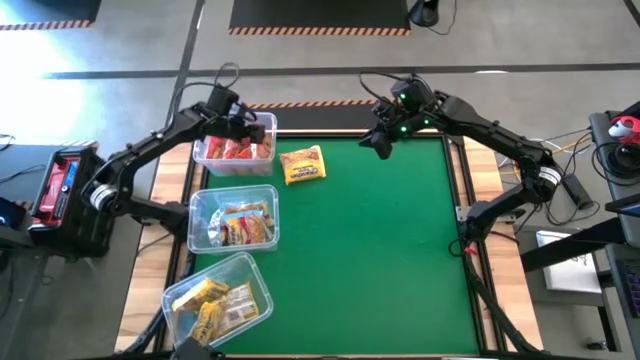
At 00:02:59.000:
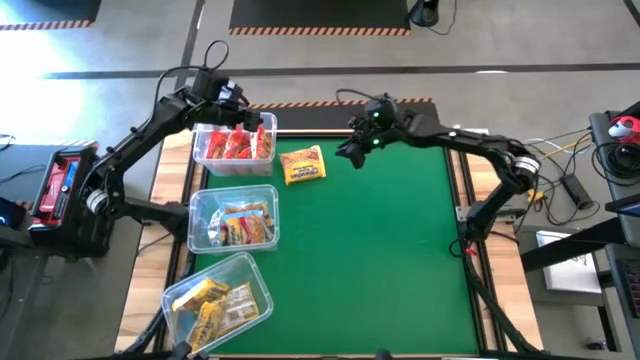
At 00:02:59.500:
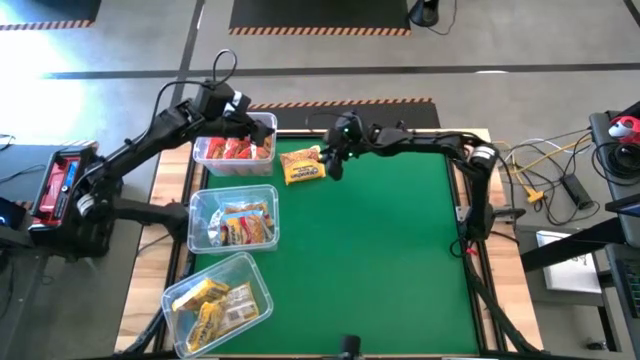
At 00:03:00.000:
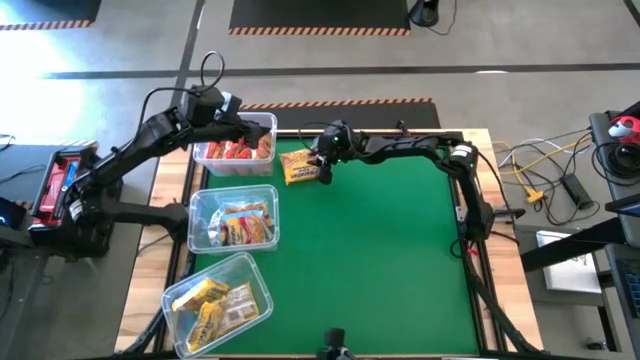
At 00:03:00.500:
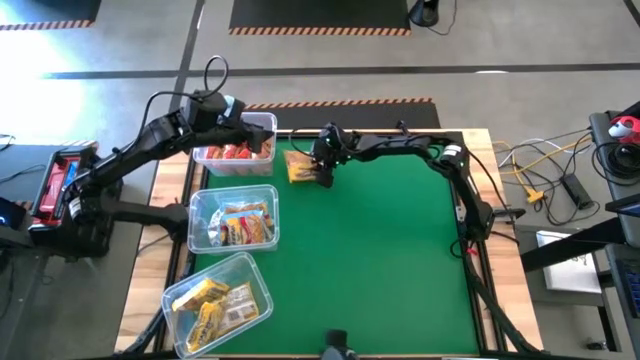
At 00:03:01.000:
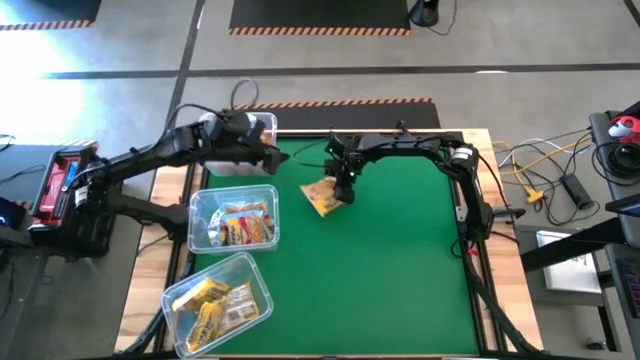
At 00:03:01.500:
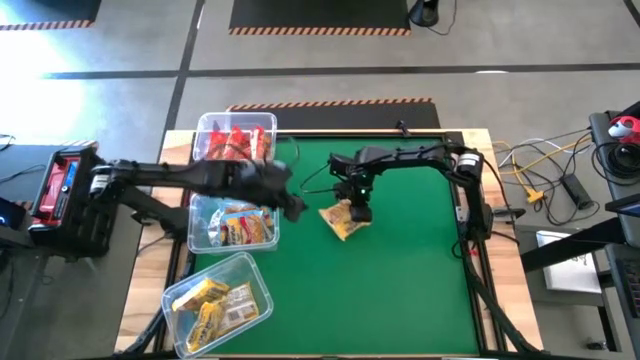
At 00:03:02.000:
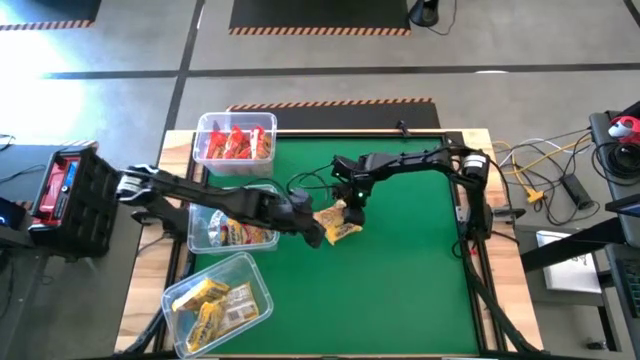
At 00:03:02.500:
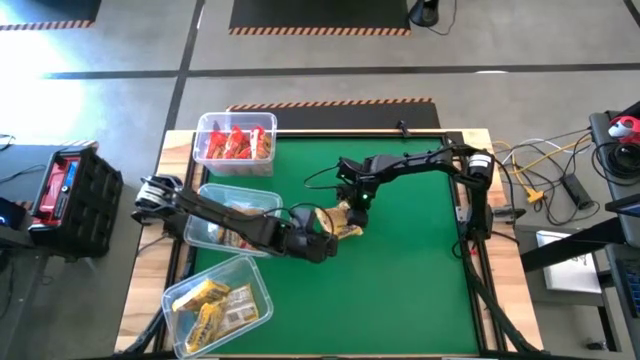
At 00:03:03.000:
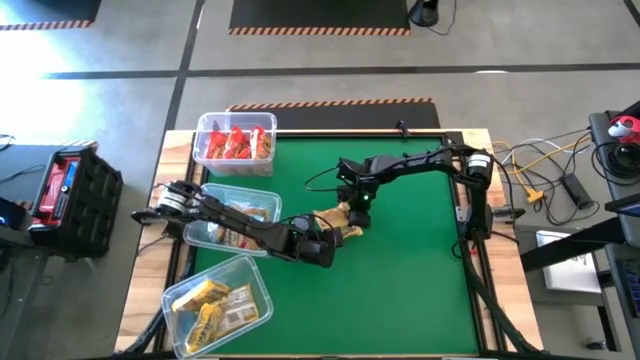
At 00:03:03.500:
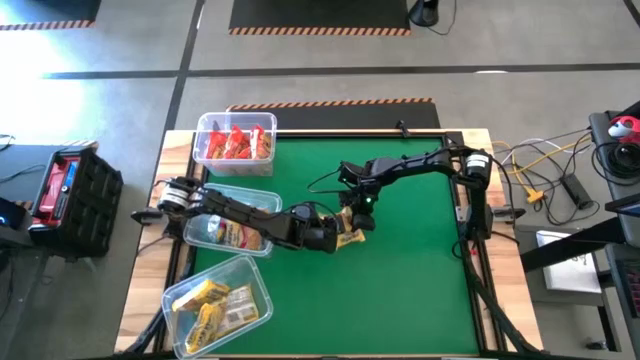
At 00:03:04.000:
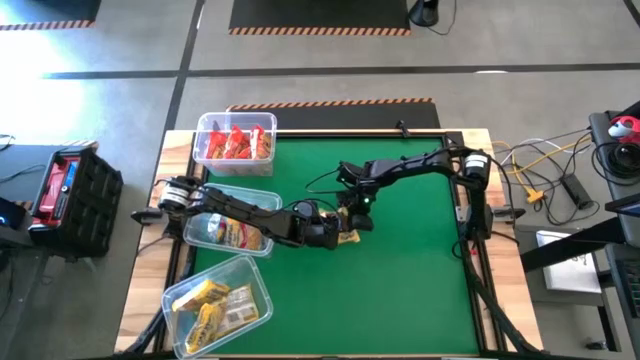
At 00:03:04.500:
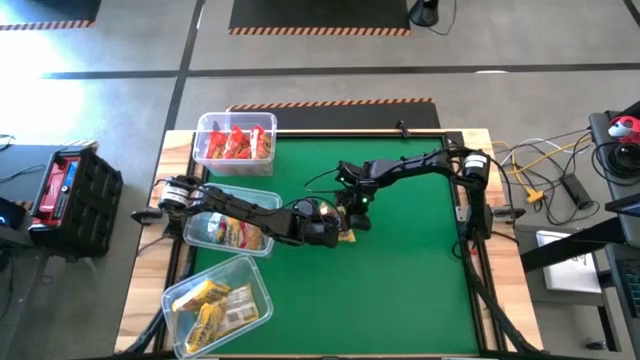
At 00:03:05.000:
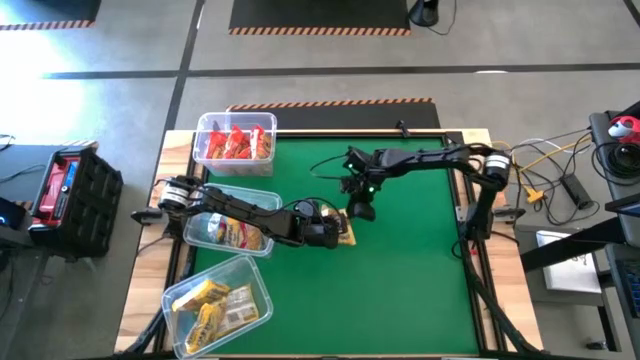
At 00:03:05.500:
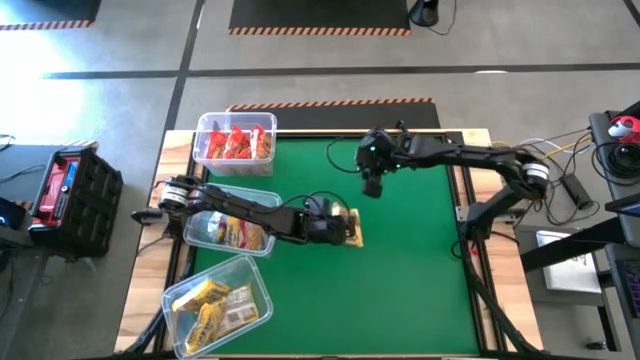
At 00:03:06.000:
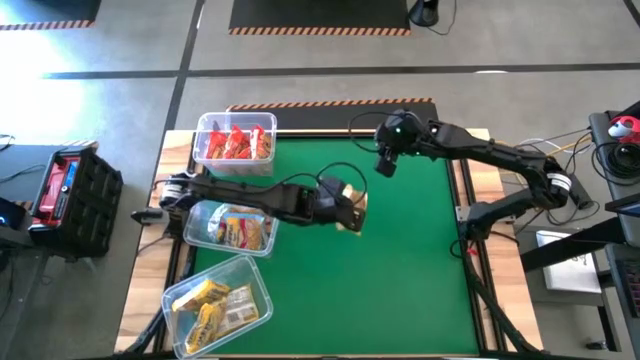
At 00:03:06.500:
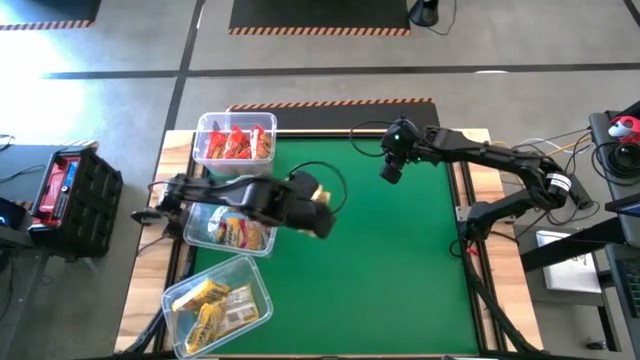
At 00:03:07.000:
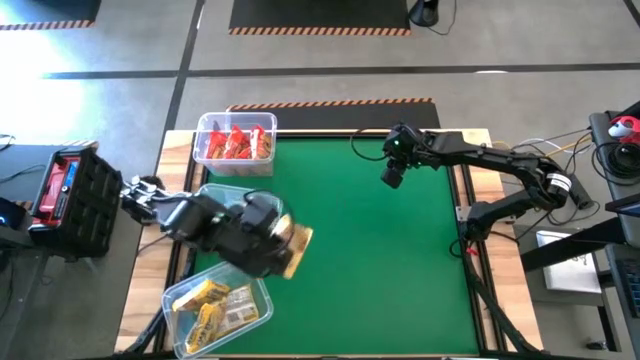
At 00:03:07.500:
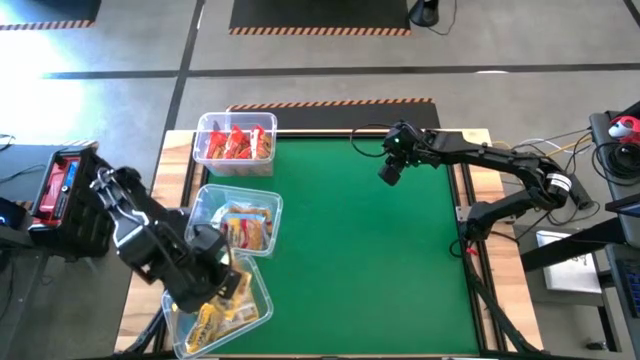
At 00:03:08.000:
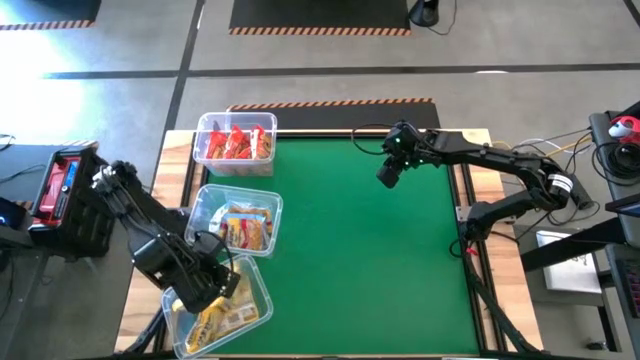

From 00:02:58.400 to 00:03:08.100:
Task: Sort Maruchan noodles
Put the yellow noodle pack into the bottom transparent bin

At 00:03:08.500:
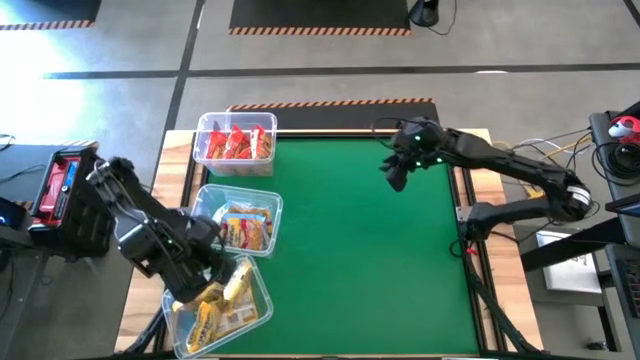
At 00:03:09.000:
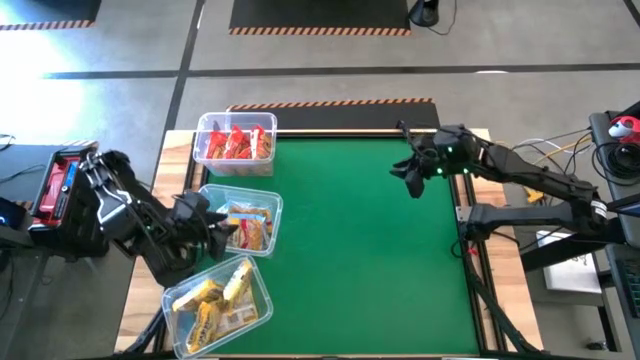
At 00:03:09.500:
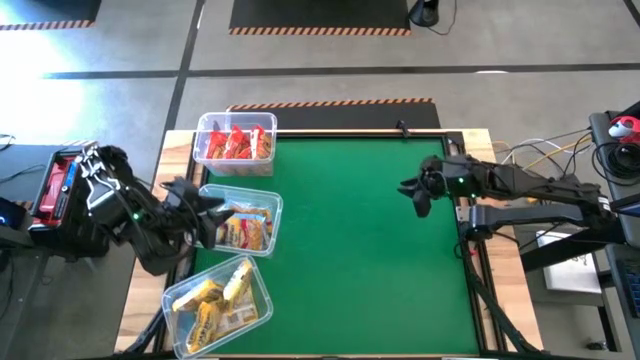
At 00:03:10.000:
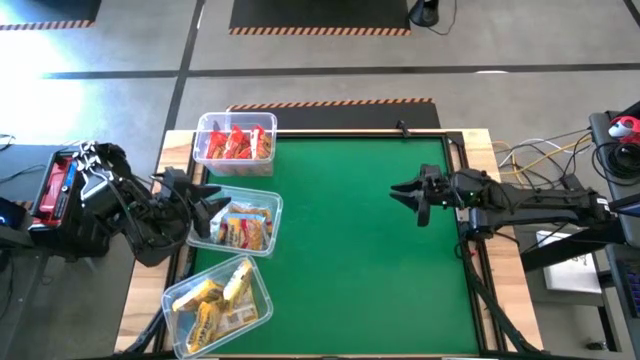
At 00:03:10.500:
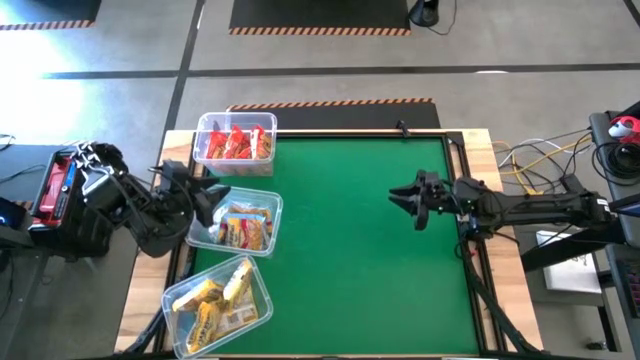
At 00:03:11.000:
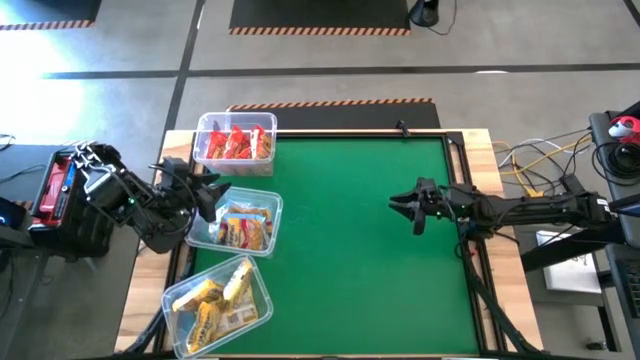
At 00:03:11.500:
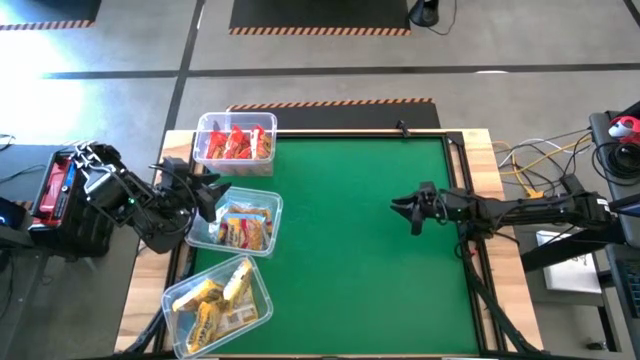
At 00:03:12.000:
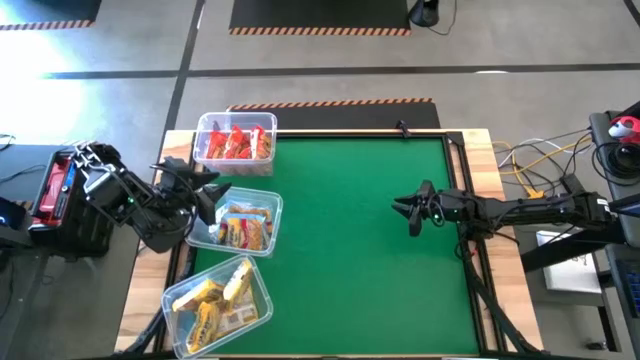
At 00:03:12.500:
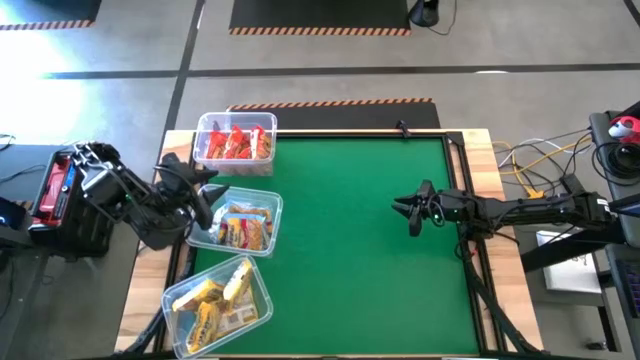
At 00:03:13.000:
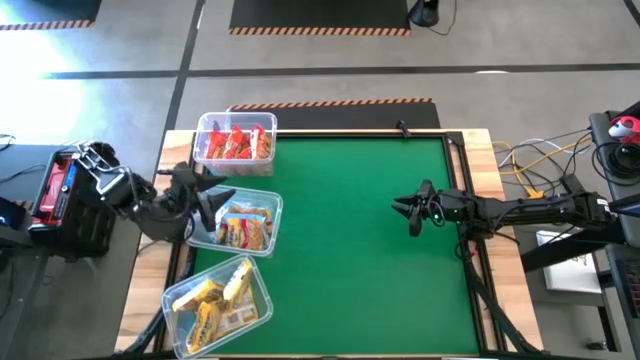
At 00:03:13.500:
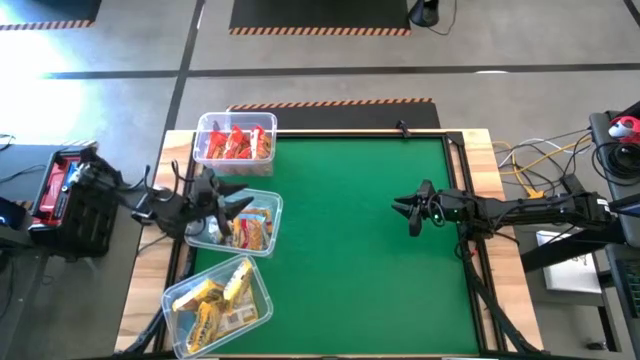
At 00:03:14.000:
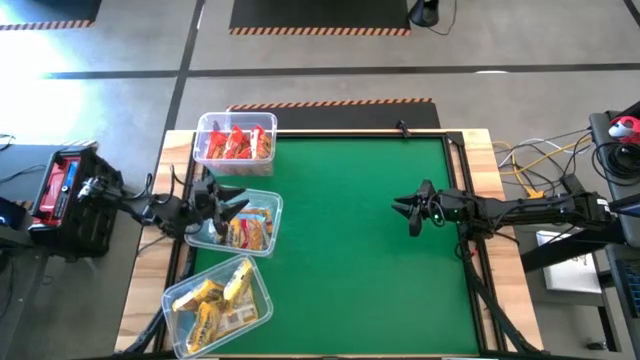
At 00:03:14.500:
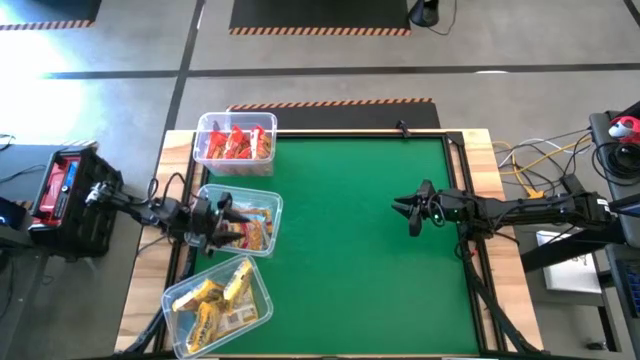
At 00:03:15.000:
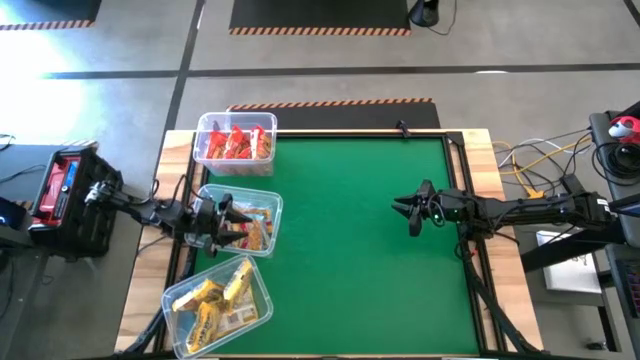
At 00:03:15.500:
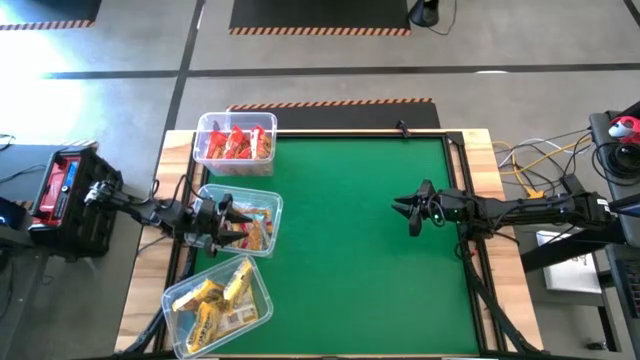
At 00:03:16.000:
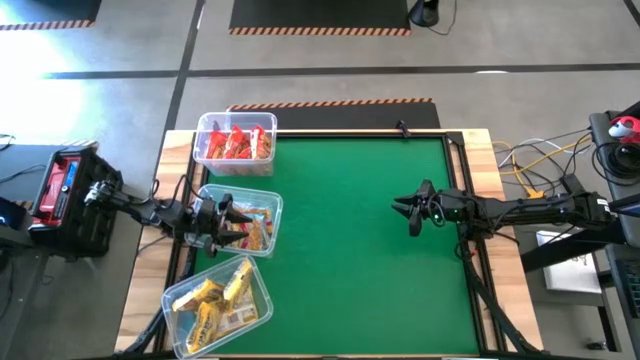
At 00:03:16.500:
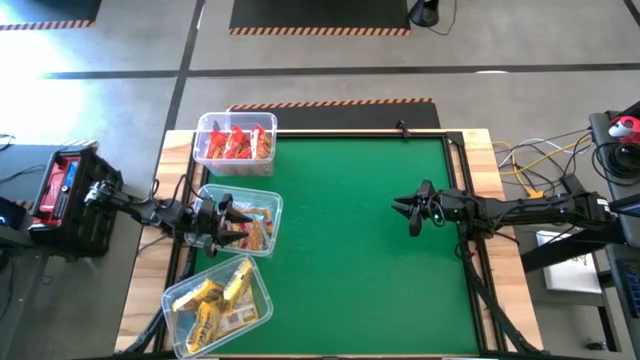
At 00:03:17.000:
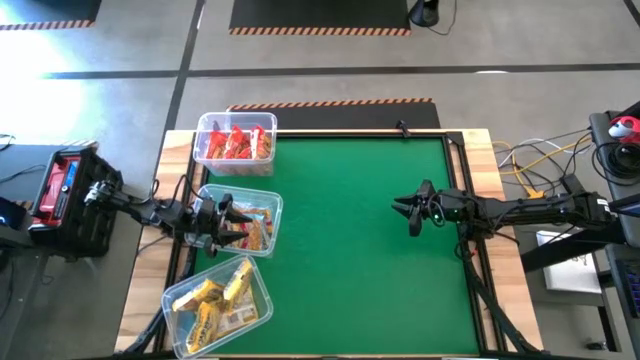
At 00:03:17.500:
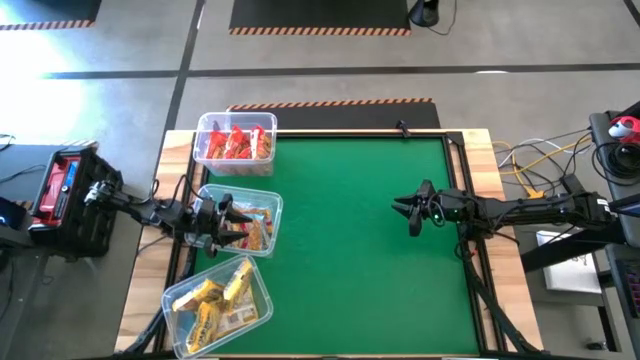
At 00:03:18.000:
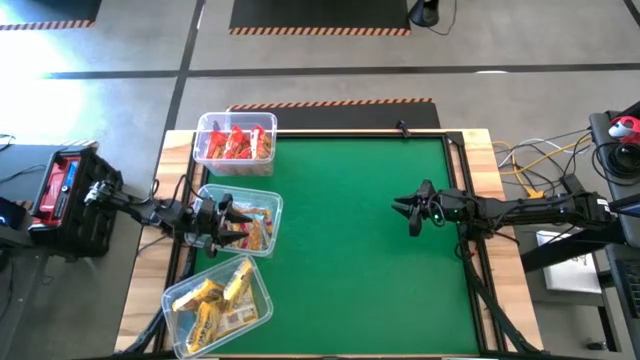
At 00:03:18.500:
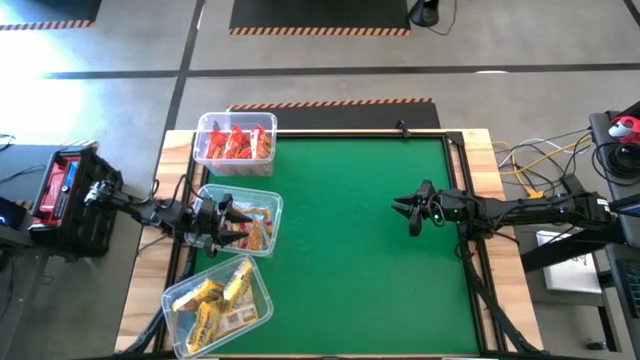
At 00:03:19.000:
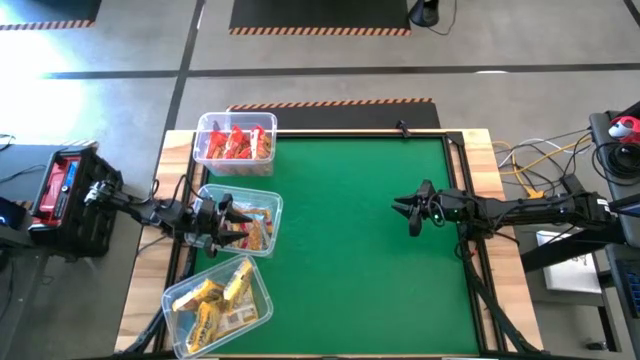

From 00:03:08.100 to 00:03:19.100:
Return to Home Position
